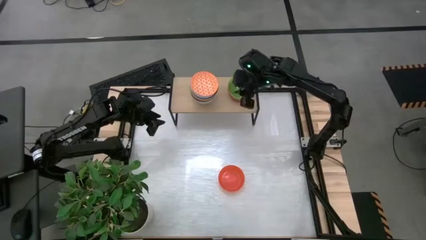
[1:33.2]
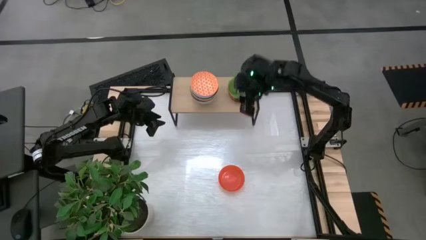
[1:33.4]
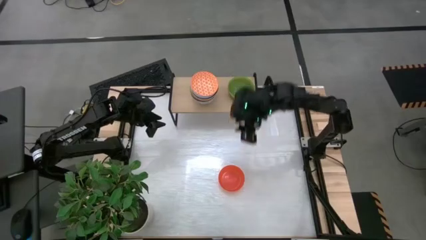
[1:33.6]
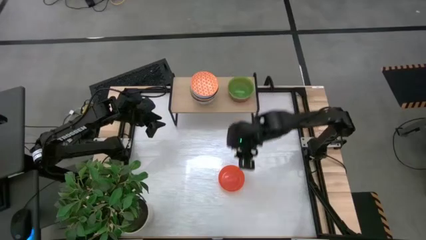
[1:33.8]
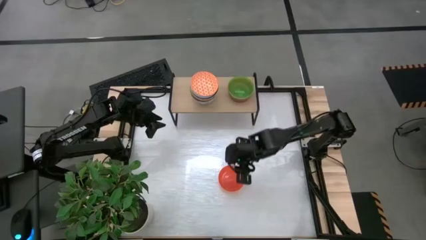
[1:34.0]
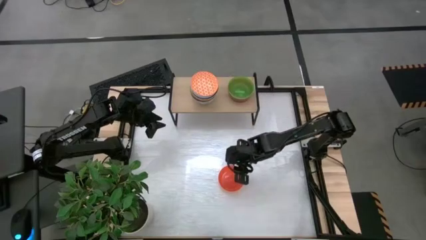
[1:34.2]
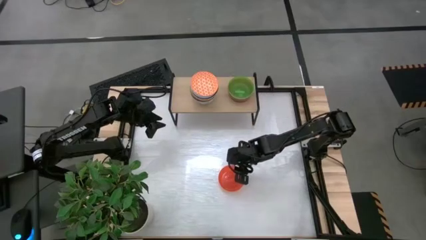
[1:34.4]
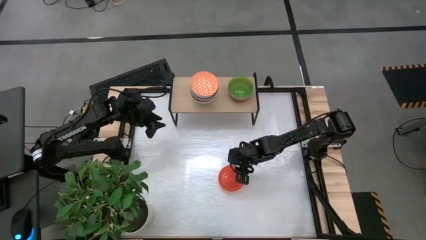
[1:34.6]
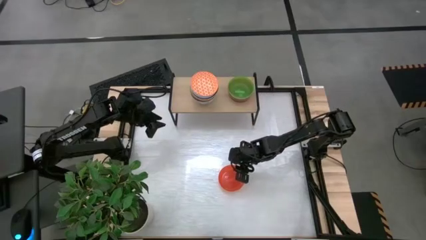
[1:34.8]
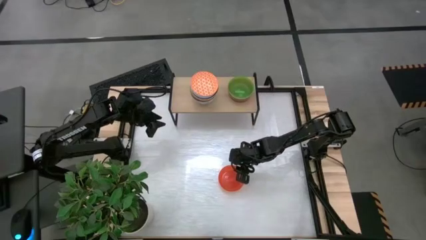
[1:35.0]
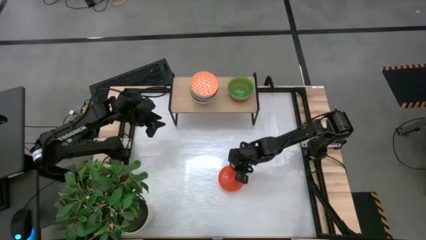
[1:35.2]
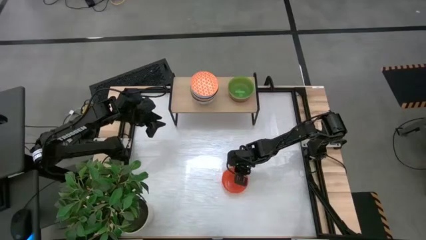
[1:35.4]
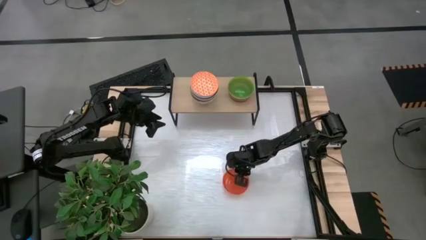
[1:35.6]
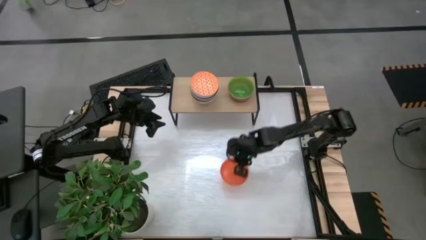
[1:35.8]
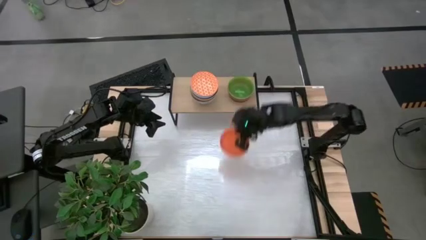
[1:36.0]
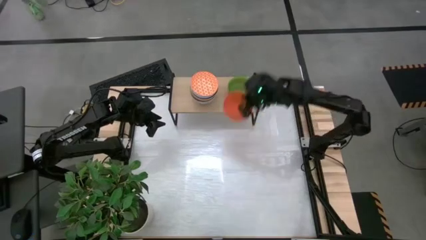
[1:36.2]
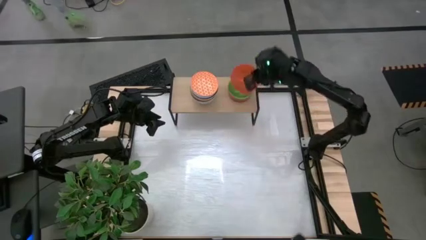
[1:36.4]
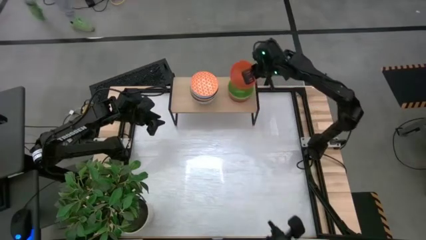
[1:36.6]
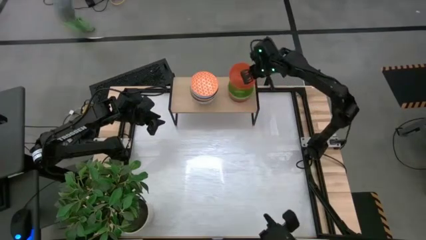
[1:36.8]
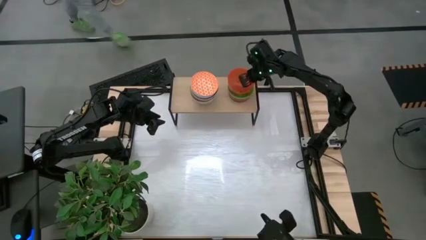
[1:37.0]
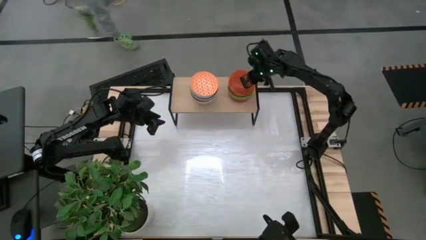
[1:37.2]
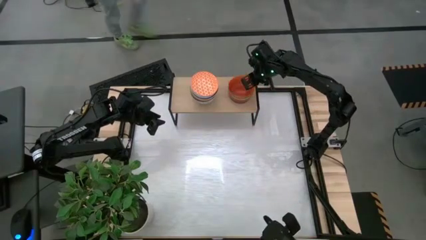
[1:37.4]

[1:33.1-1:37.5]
Task: Place and stack bowls onto a shelf
Stack the orange bowl on top of the green bowl on the shelf

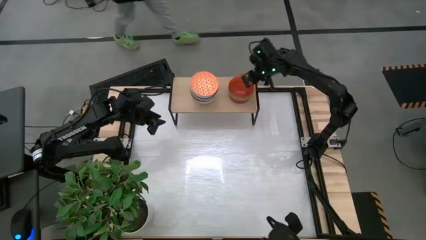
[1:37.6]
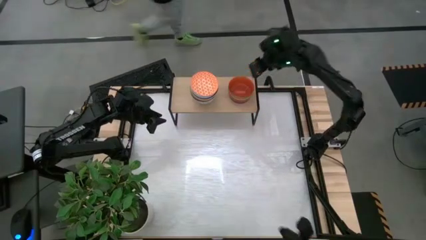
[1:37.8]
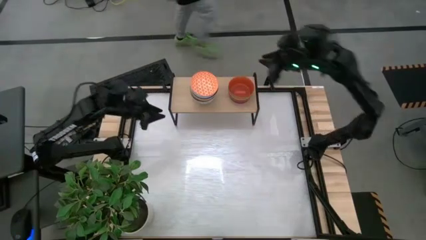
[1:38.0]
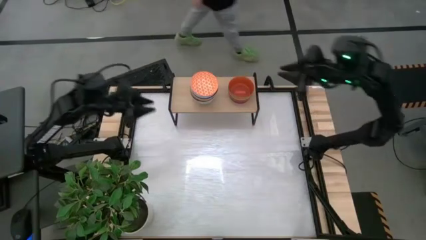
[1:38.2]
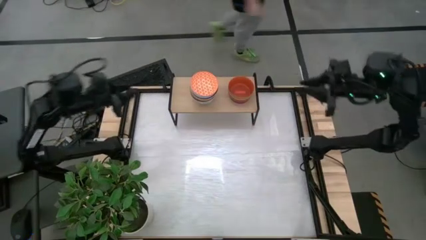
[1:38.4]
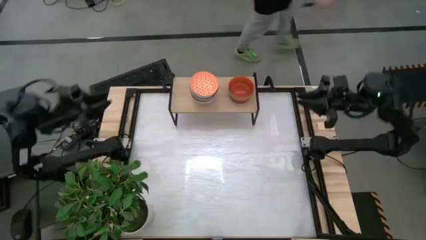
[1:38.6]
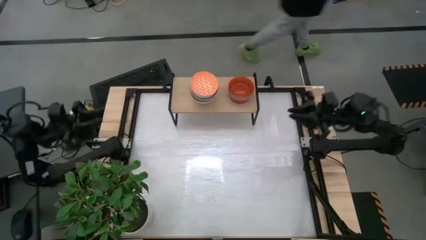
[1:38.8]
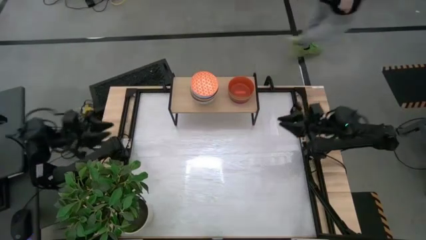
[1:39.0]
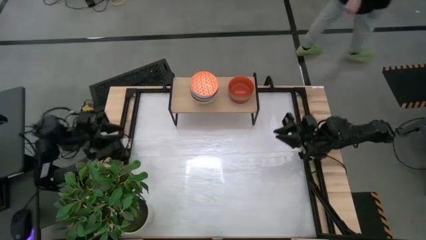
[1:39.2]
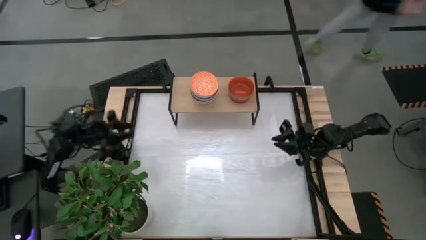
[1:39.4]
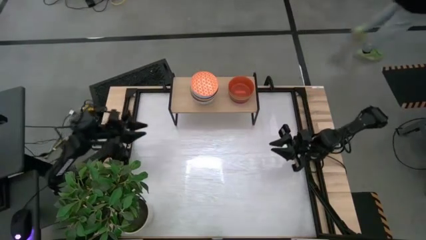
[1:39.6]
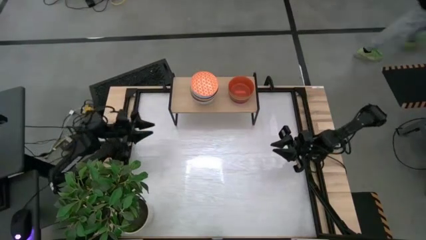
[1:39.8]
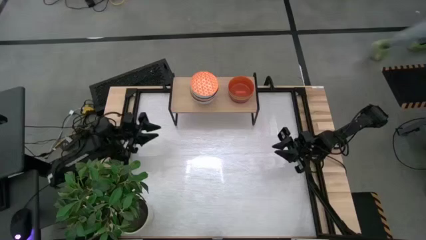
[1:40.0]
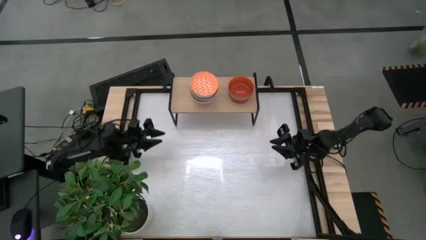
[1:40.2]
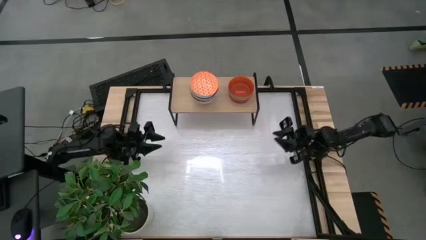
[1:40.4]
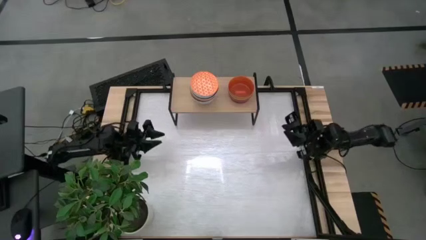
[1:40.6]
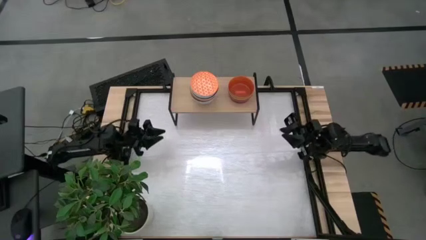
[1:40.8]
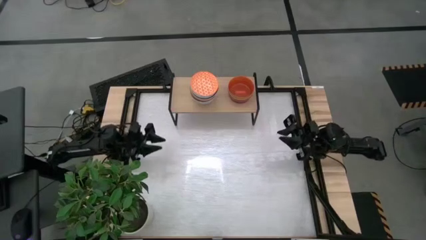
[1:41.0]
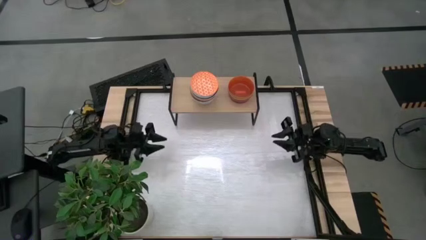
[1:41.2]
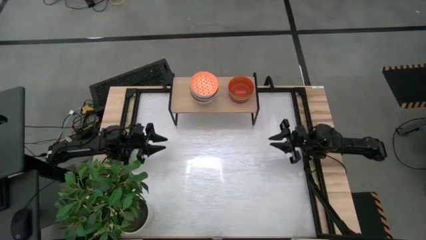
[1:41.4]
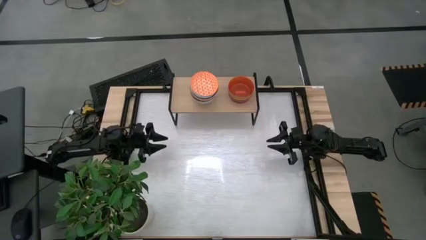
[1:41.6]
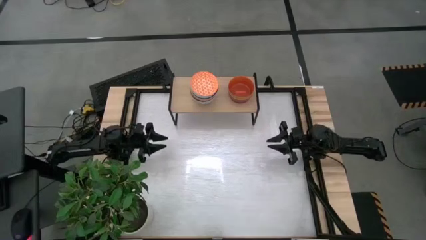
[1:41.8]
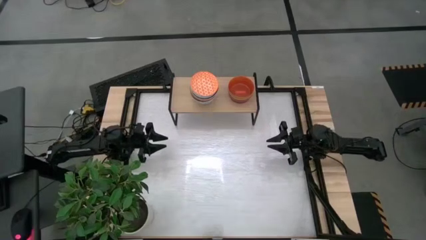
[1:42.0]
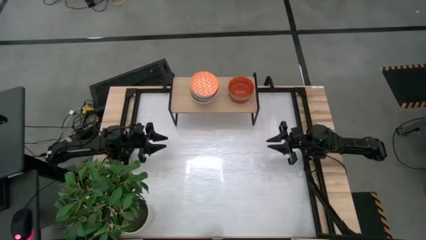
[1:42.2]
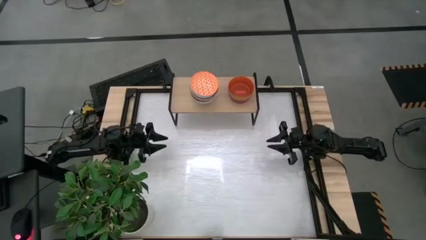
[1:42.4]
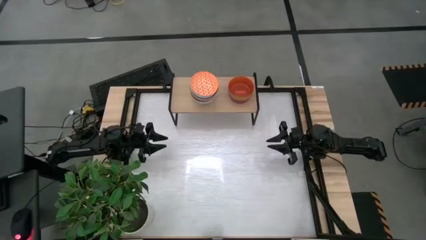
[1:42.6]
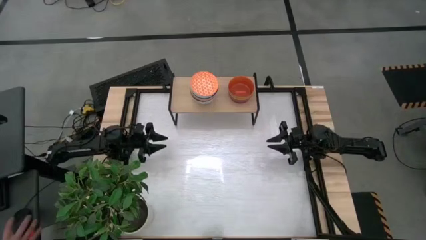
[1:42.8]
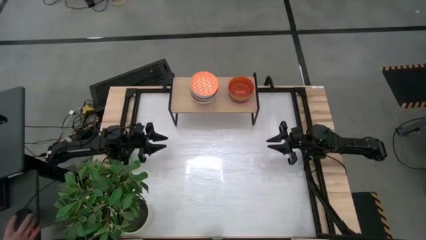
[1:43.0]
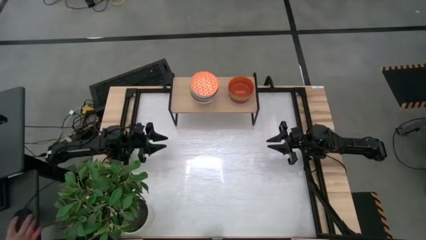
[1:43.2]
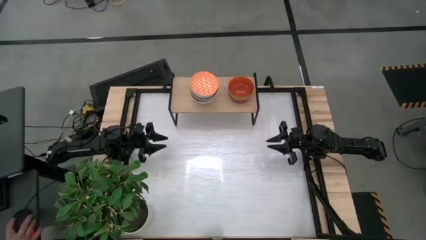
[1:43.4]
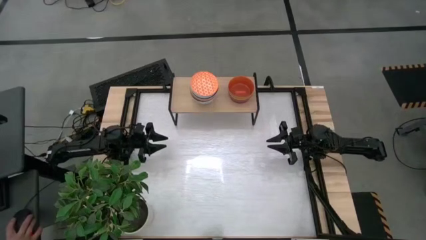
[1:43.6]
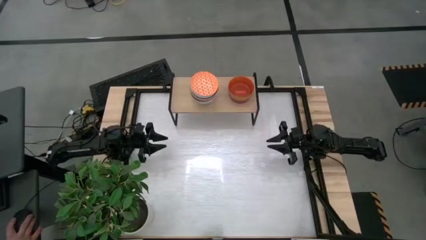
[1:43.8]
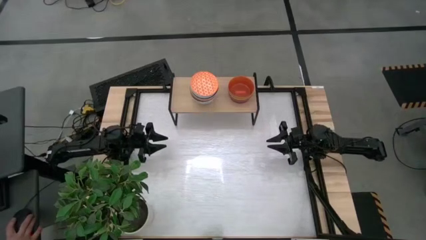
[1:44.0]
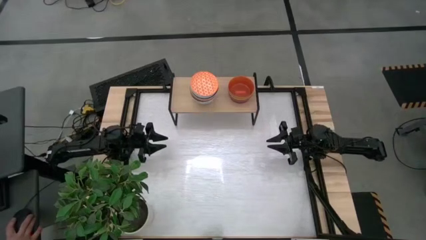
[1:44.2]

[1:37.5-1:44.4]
Return to Home Position

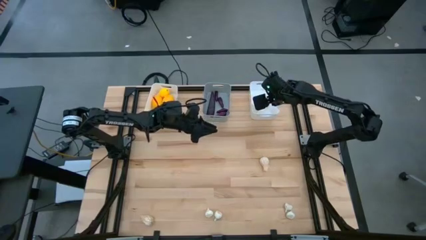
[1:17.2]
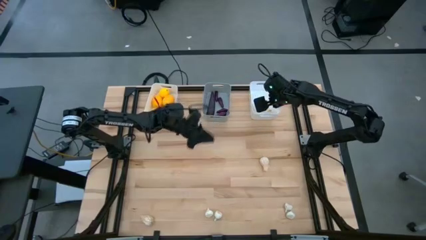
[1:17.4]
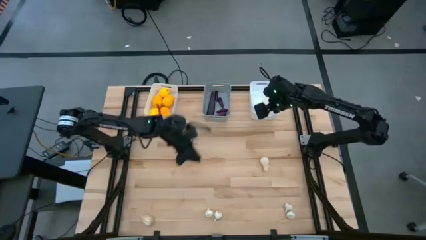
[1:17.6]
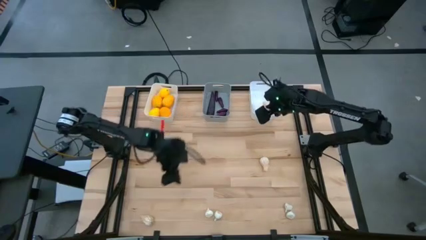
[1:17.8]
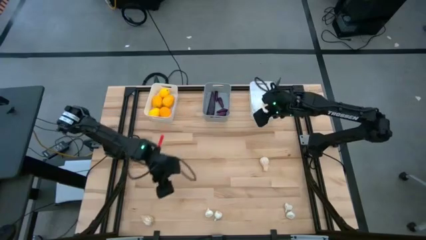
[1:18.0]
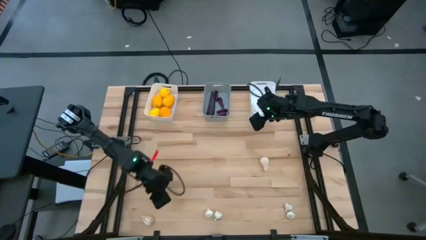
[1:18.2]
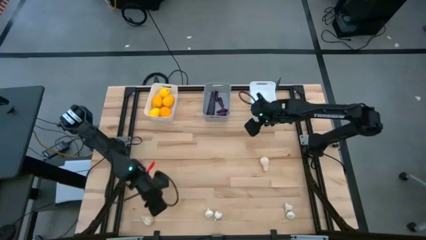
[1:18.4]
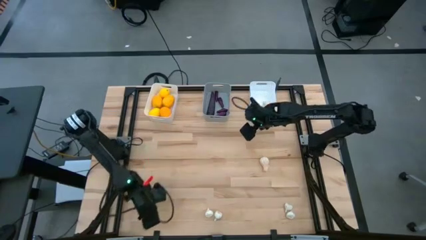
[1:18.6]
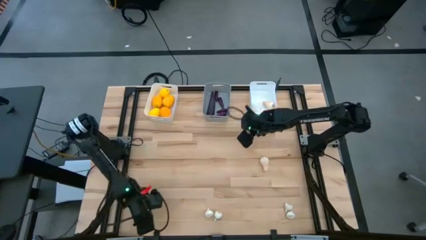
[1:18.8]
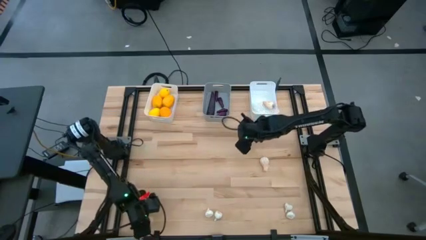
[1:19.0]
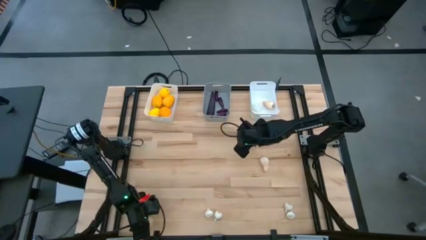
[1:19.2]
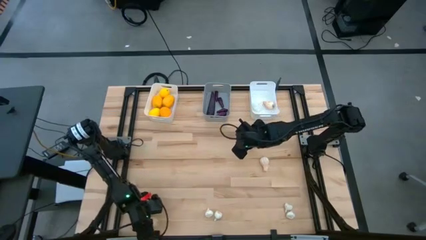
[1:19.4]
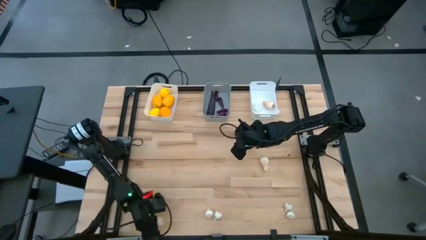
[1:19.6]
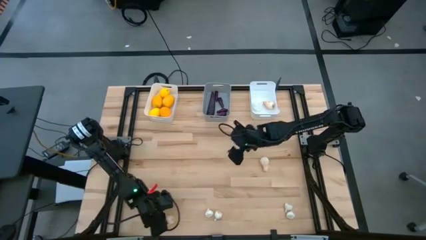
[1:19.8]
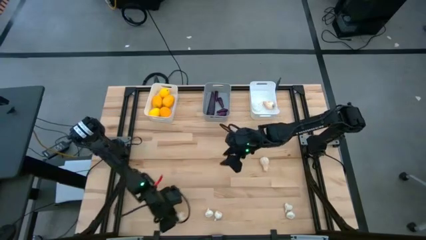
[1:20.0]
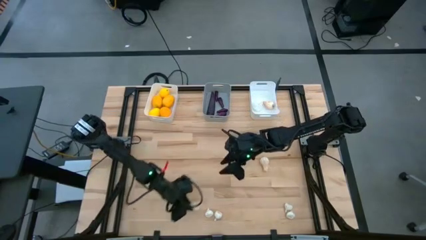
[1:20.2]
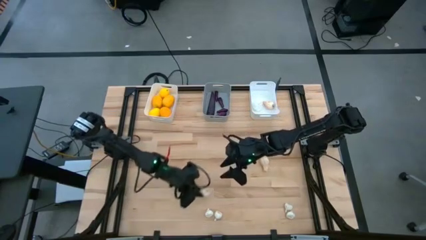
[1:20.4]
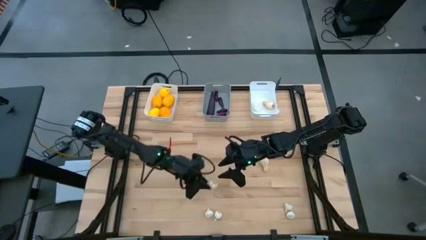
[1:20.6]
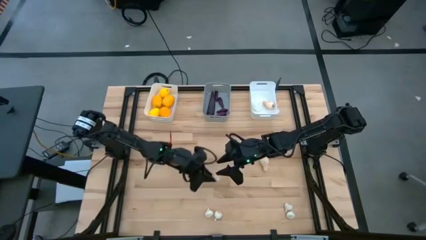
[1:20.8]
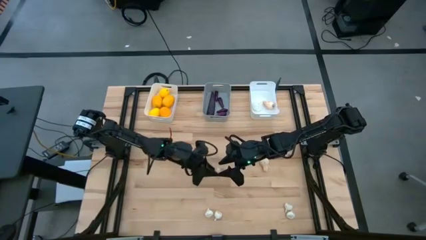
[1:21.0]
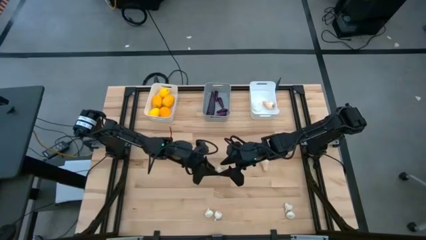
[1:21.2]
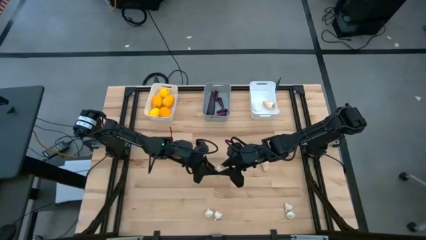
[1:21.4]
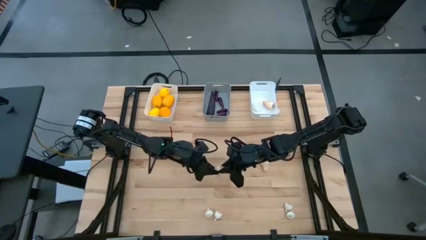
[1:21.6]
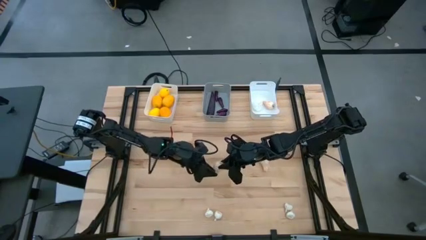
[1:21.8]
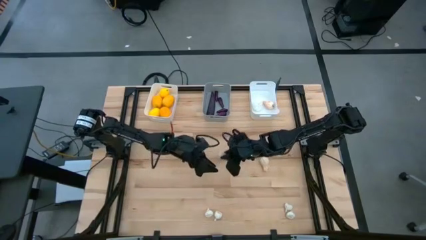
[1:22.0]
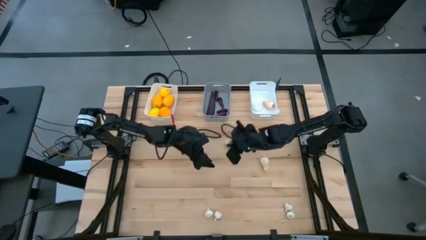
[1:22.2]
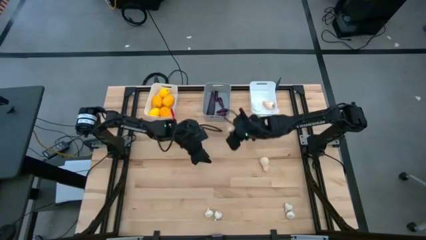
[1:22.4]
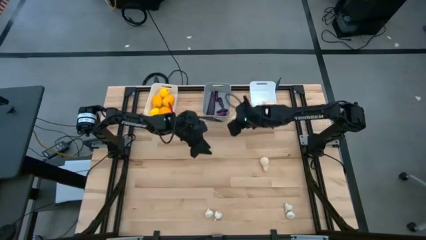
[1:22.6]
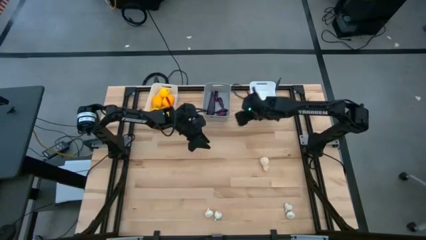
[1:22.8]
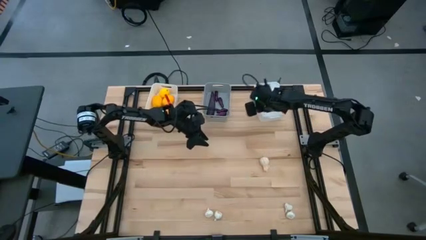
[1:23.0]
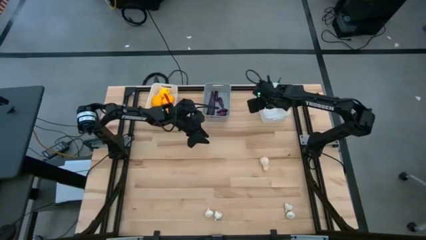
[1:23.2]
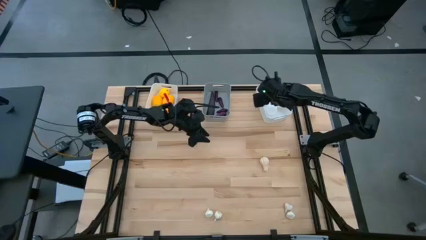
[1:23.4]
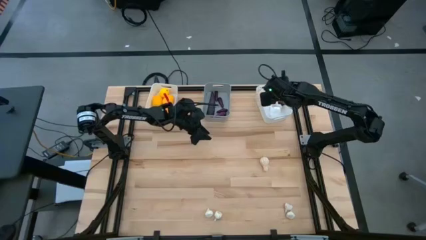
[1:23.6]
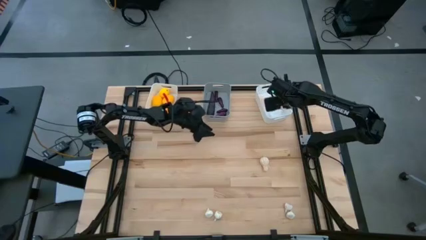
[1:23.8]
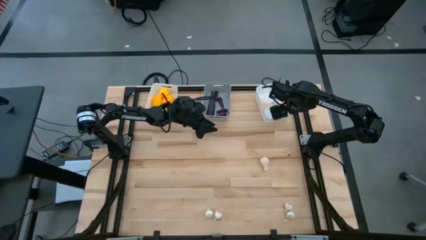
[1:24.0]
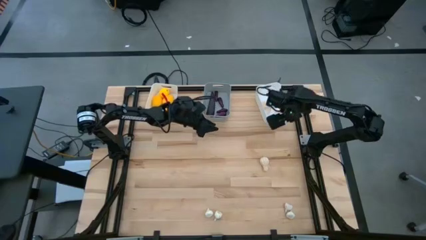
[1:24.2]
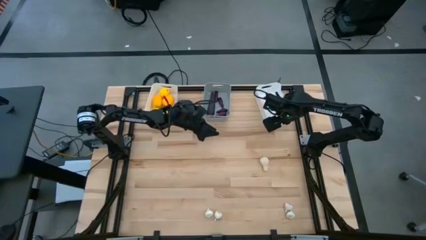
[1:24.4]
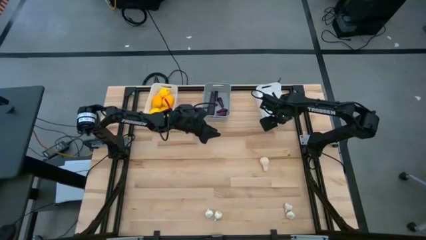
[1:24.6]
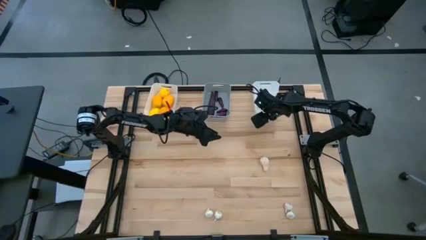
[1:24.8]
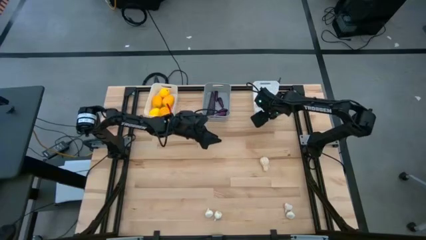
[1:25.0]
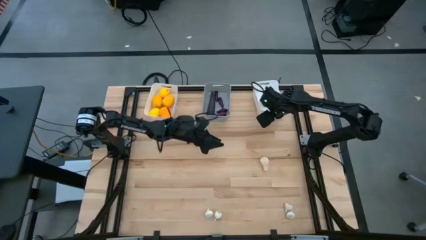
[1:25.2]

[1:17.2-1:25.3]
Task: Sort produce into baskets
Put the garlic into the right white bin
